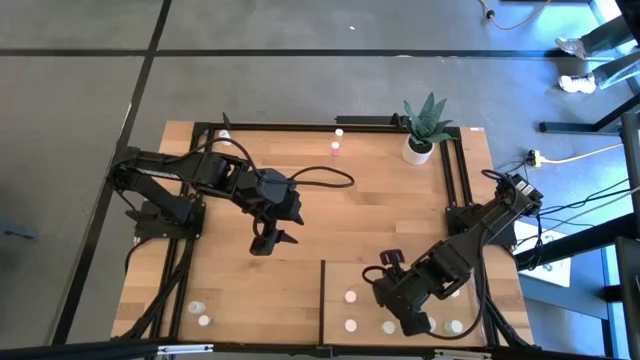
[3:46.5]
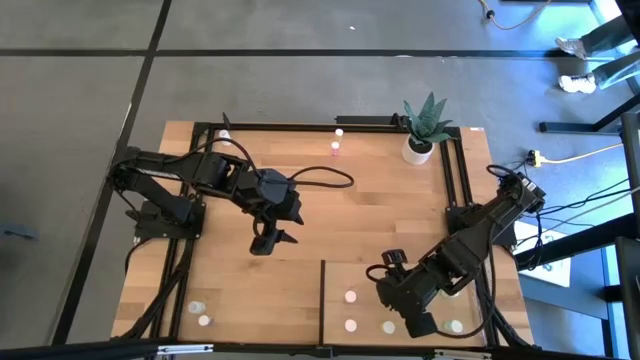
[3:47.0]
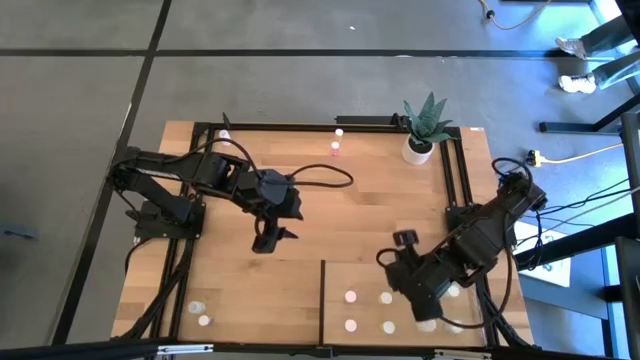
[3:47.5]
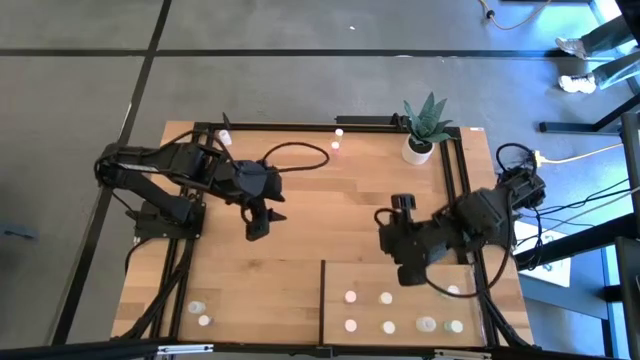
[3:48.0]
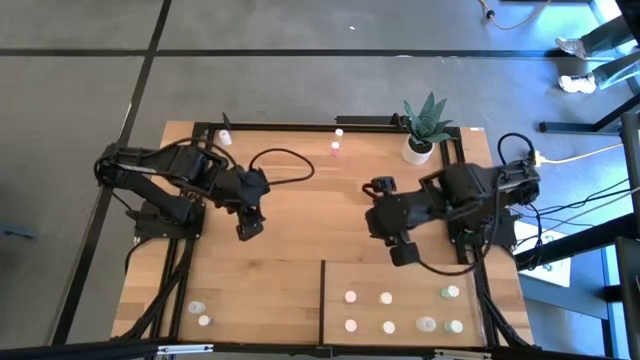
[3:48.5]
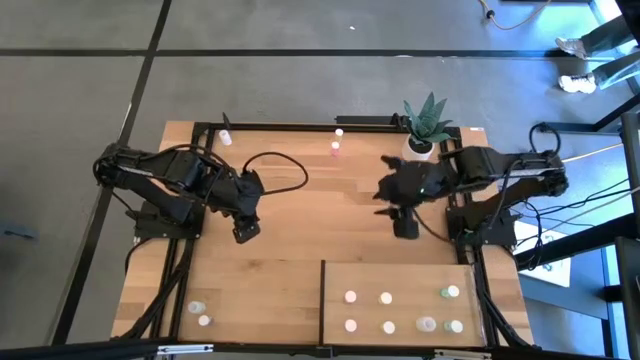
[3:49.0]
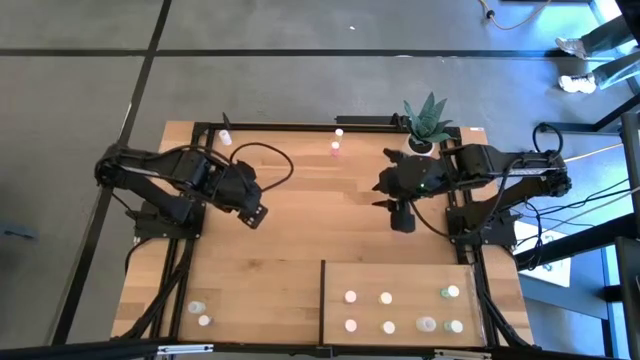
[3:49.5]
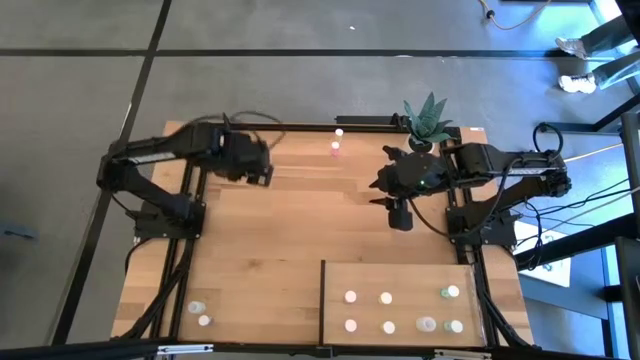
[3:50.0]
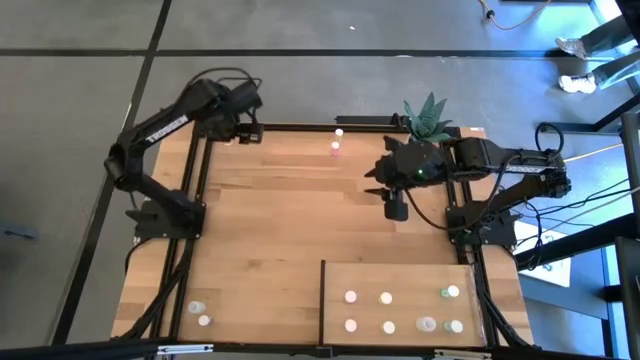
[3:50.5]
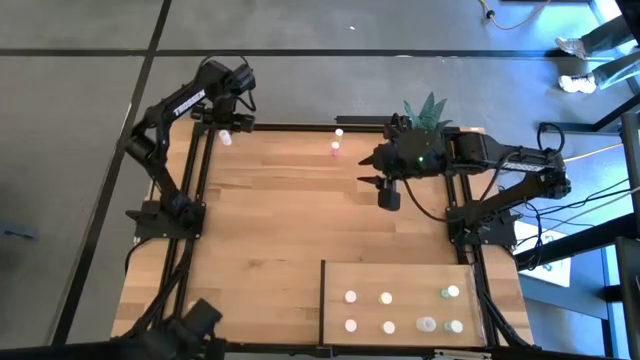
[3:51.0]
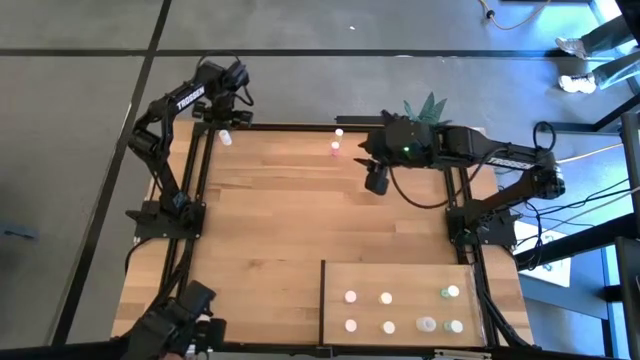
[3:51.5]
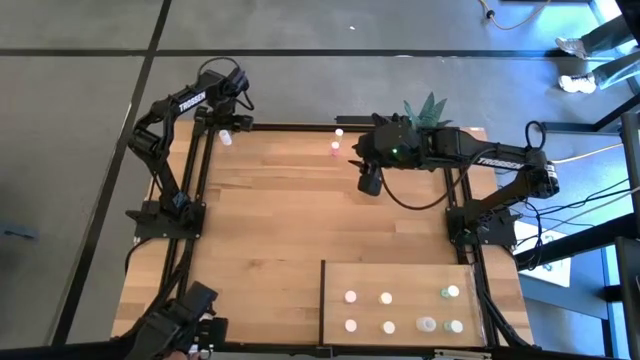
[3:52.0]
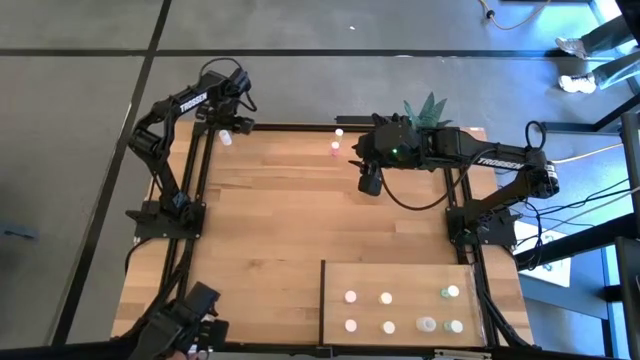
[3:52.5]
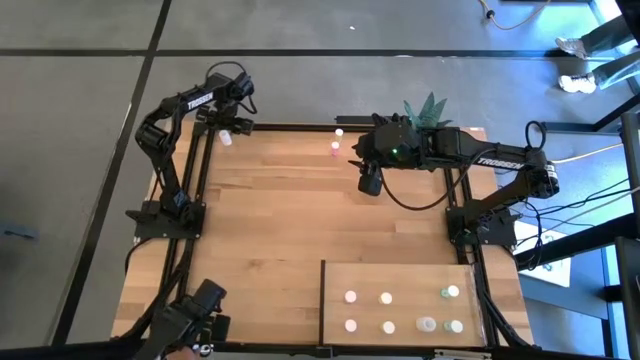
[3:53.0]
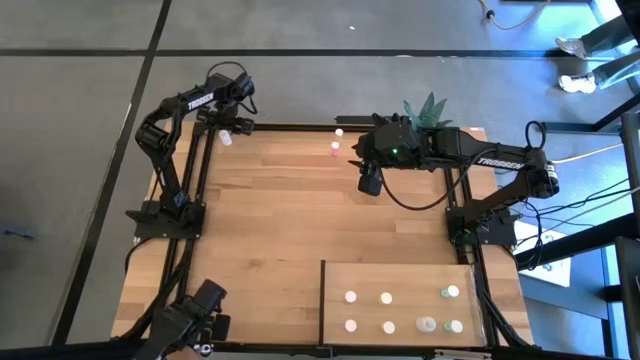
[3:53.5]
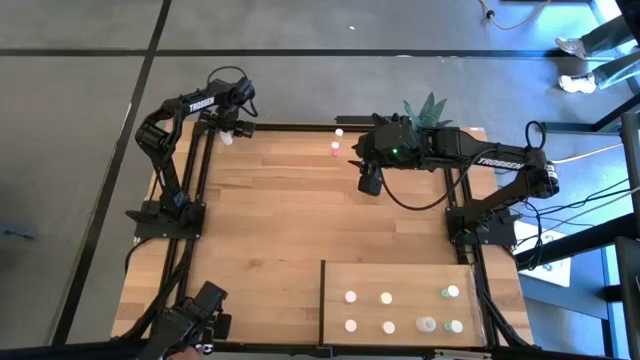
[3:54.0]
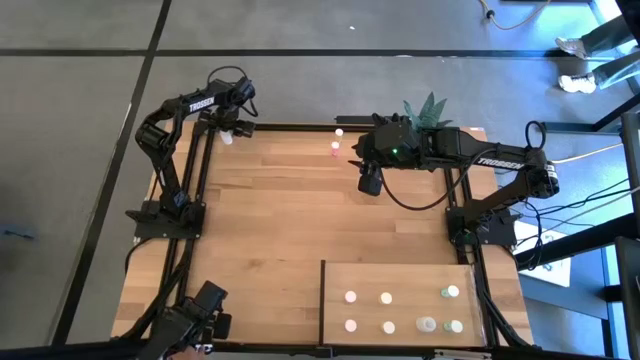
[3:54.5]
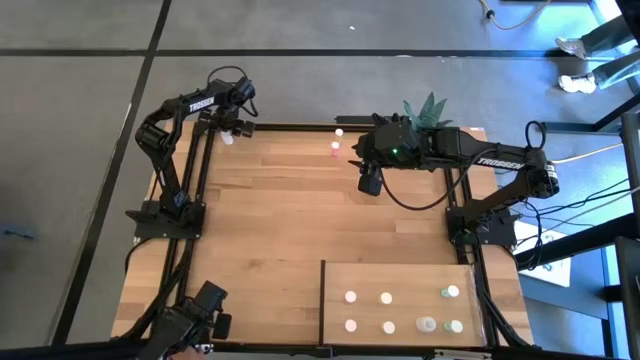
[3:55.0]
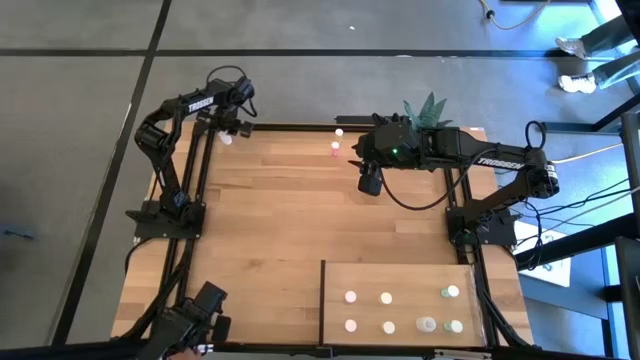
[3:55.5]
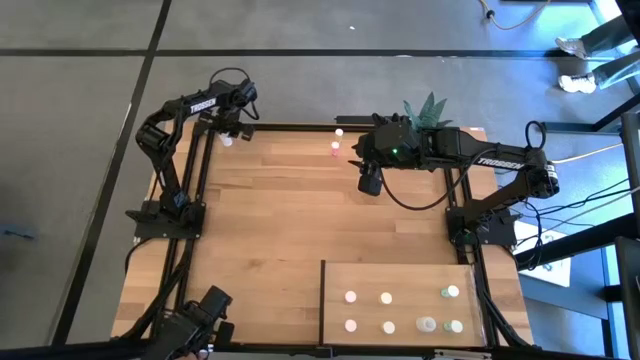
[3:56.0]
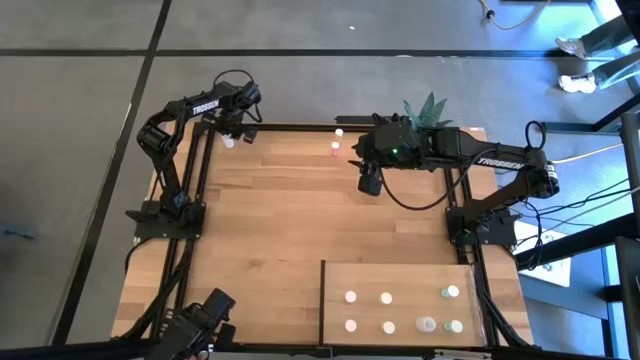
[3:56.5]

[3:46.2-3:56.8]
Task: Pick and place medicine bottles onto shelf by color
Put the top transparent pill bottle on the shelf aligned with the other transparent pill bottle

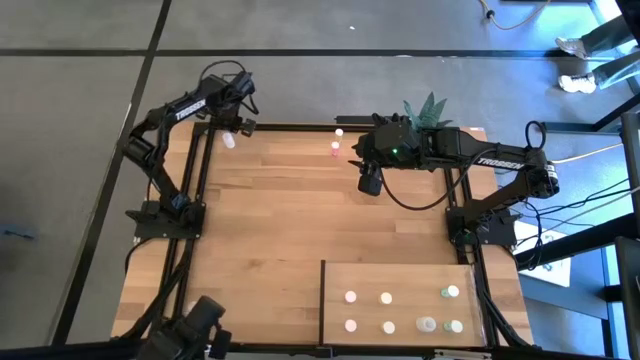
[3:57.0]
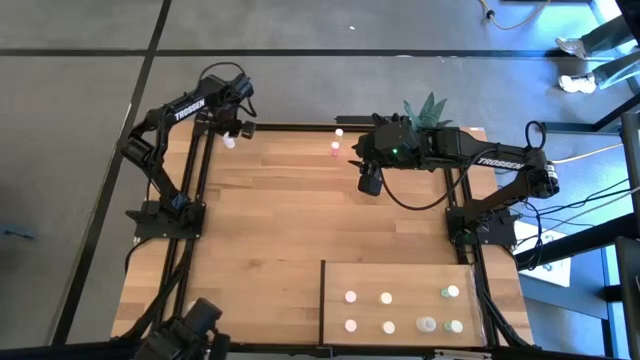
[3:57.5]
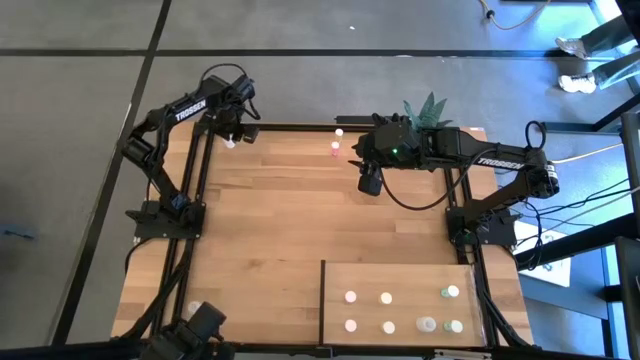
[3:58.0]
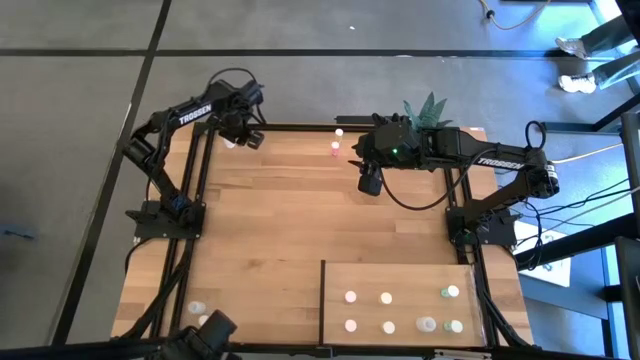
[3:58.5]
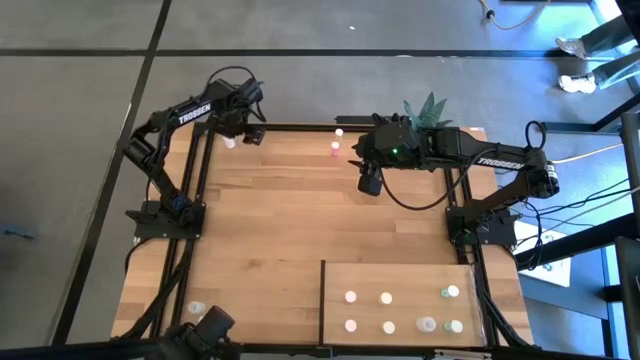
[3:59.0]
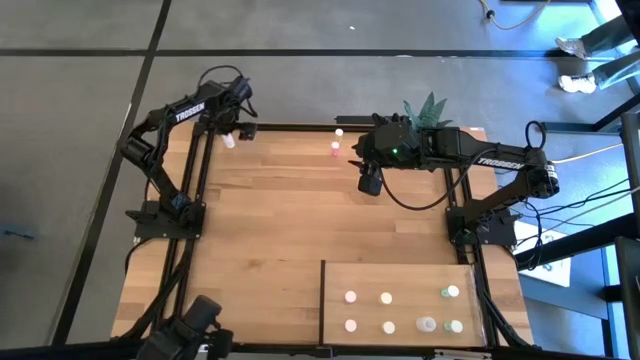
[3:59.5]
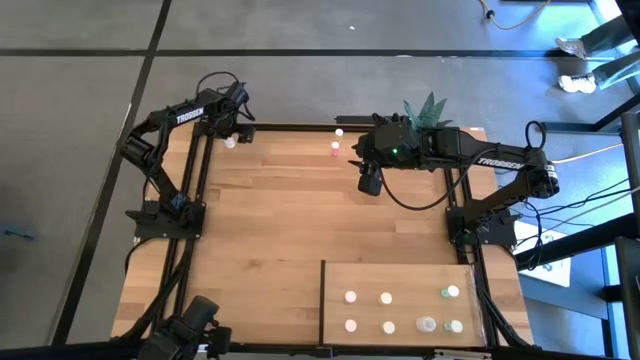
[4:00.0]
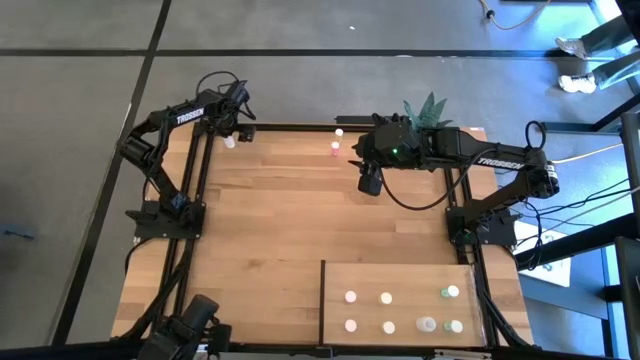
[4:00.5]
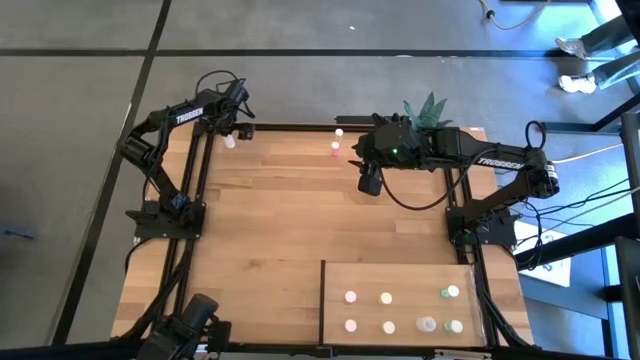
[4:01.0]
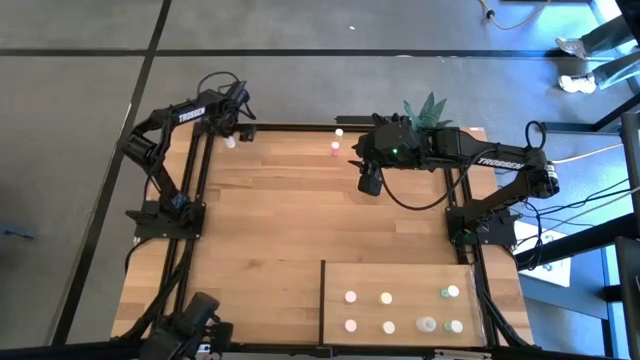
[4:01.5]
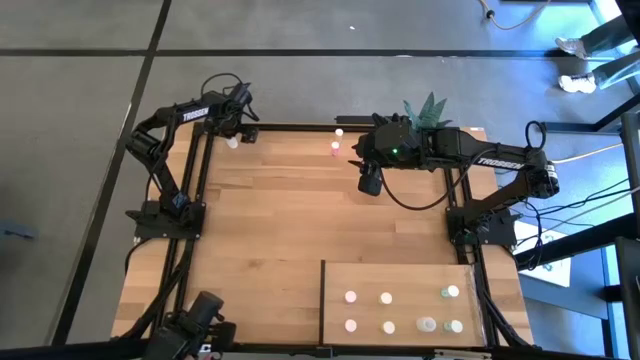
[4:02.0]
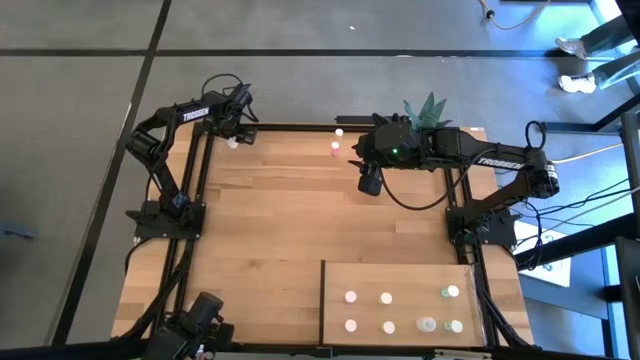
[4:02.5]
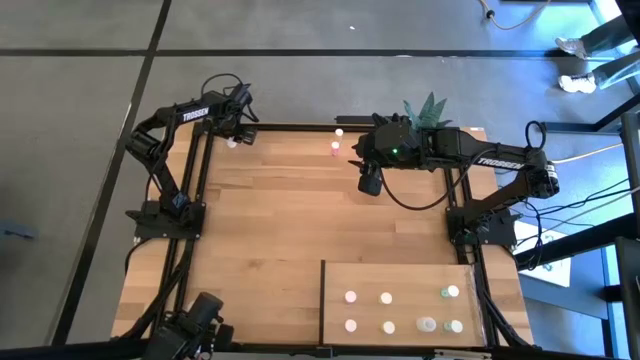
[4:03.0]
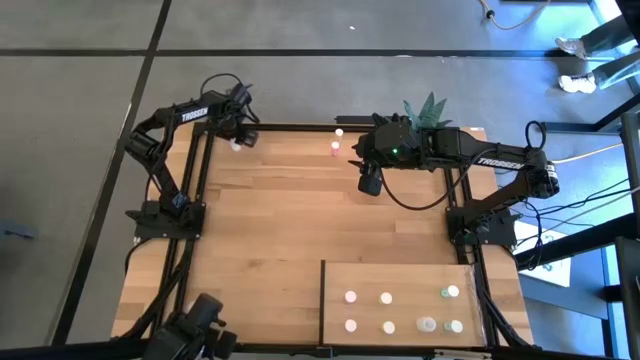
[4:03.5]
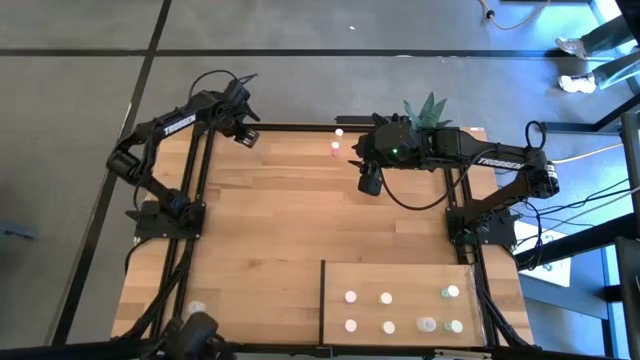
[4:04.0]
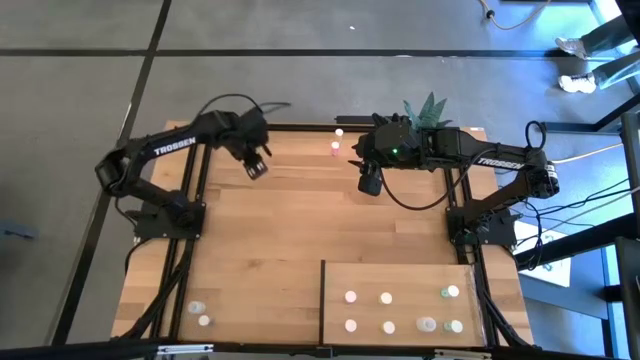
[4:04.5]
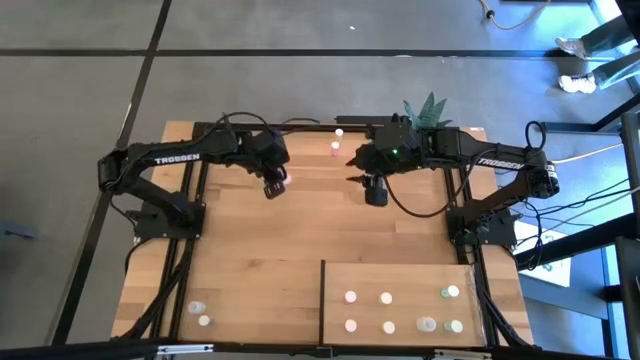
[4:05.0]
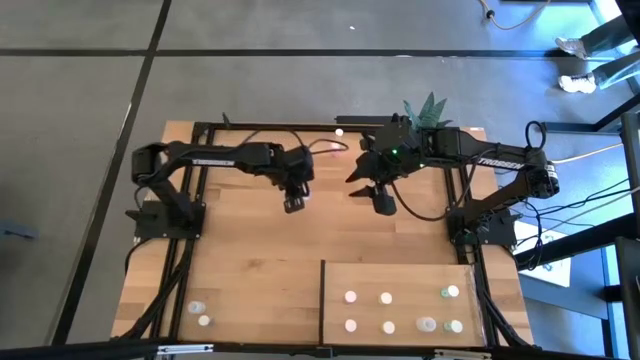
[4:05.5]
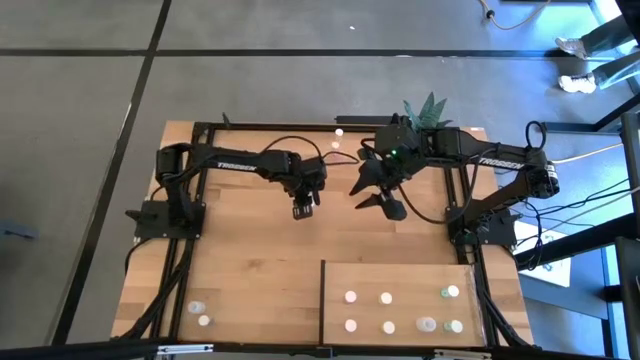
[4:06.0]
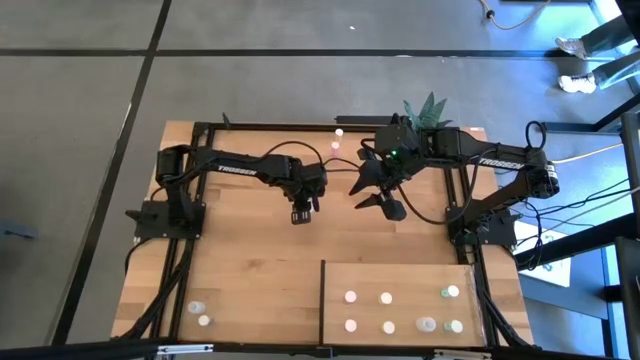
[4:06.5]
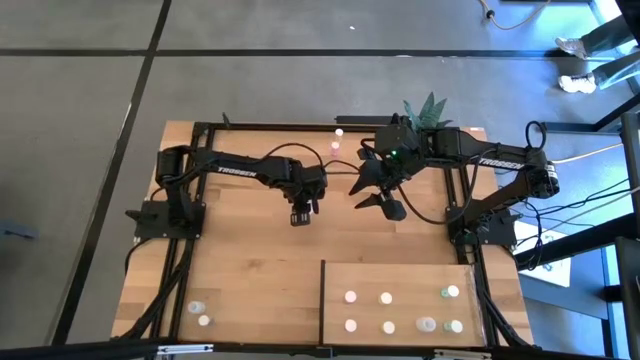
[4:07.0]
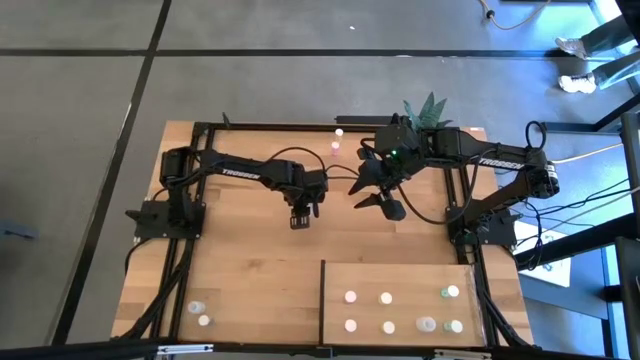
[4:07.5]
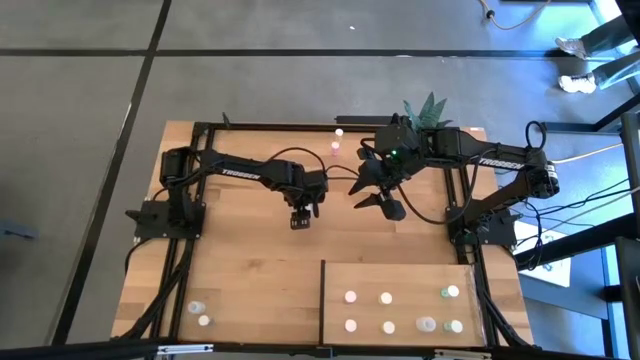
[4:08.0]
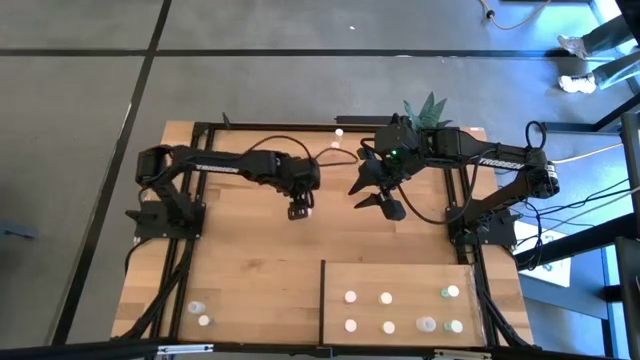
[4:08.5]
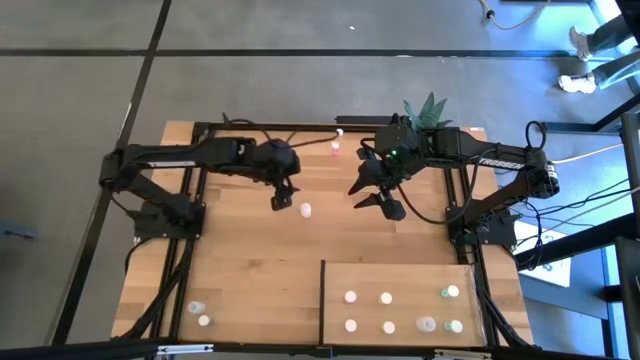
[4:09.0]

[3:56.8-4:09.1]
Put the top transparent pill bottle on the shelf aligned with the other transparent pill bottle
